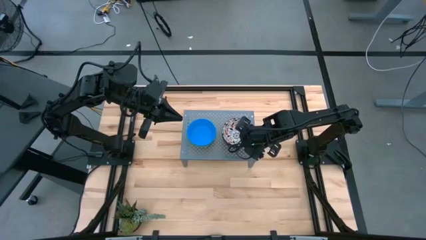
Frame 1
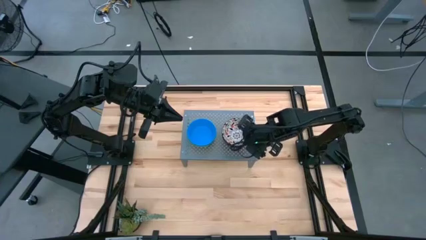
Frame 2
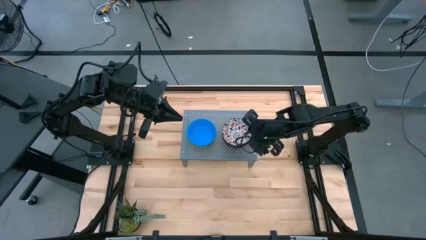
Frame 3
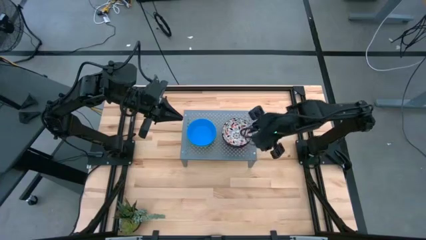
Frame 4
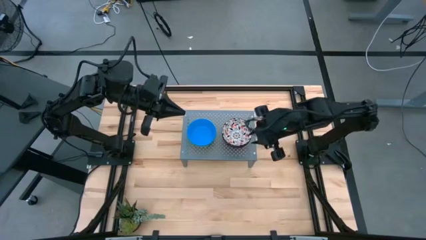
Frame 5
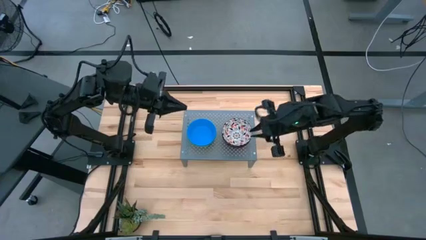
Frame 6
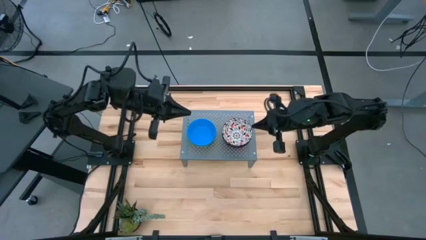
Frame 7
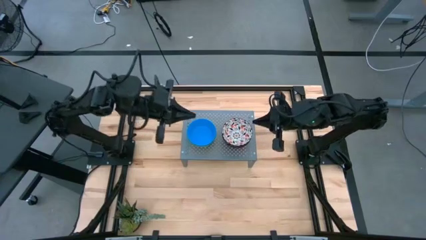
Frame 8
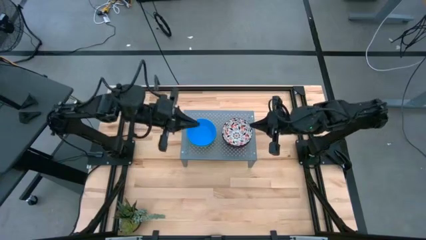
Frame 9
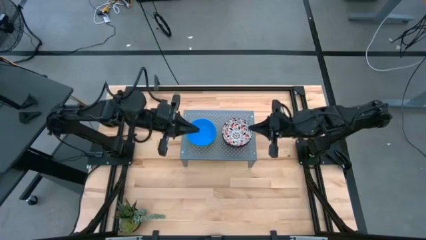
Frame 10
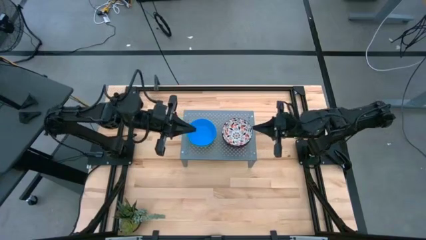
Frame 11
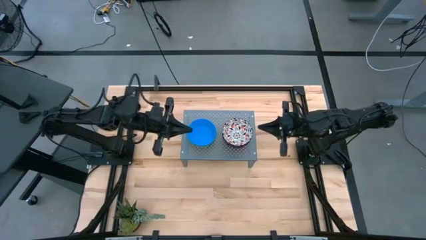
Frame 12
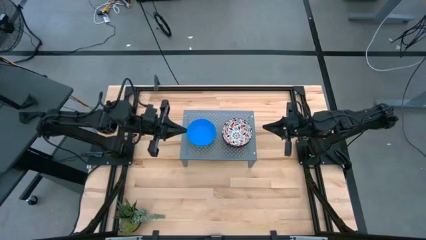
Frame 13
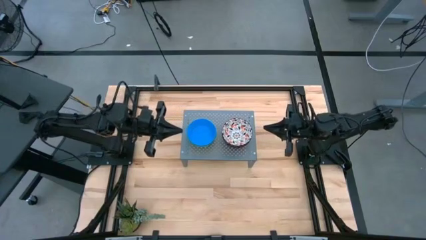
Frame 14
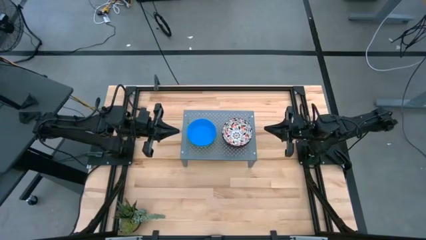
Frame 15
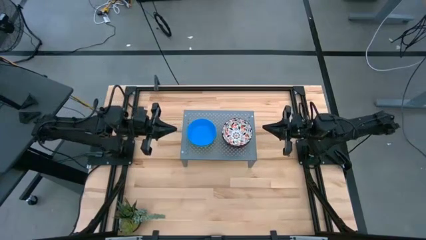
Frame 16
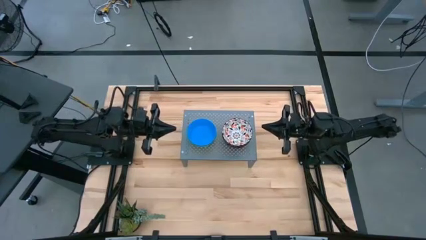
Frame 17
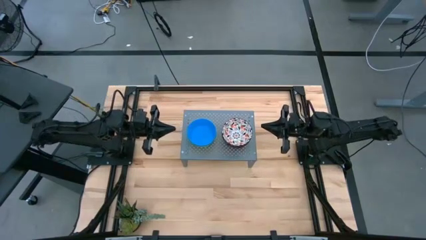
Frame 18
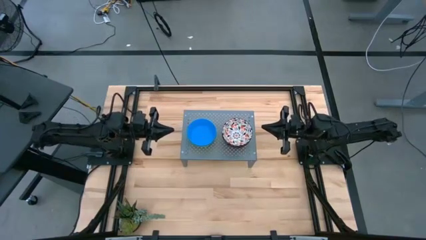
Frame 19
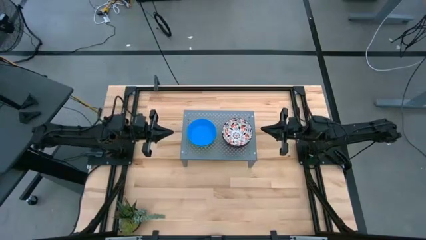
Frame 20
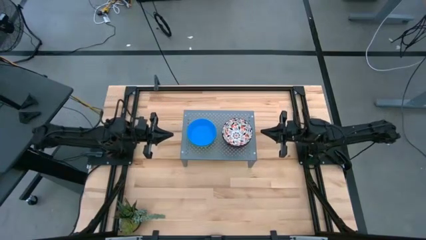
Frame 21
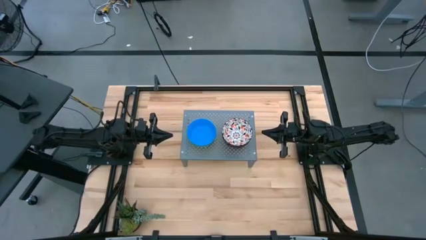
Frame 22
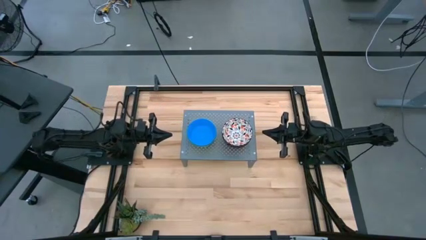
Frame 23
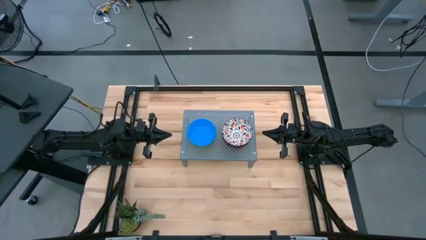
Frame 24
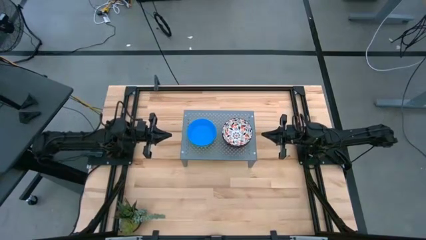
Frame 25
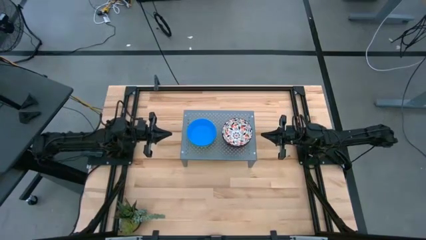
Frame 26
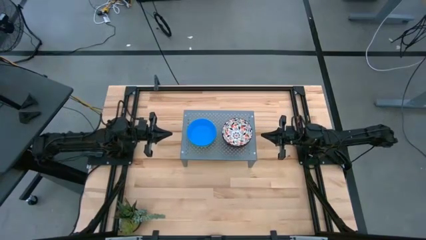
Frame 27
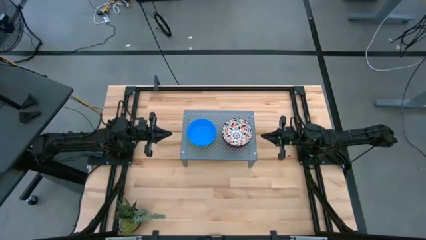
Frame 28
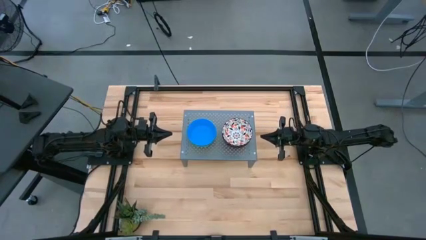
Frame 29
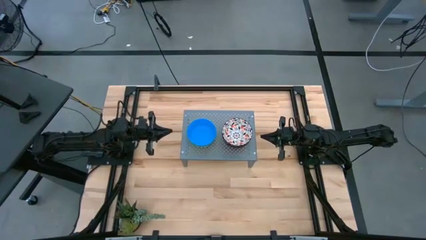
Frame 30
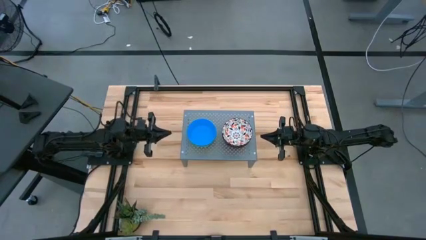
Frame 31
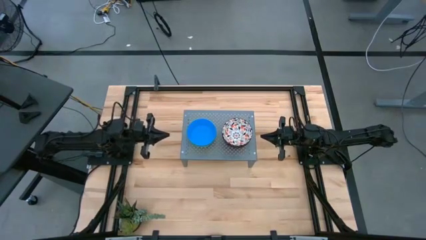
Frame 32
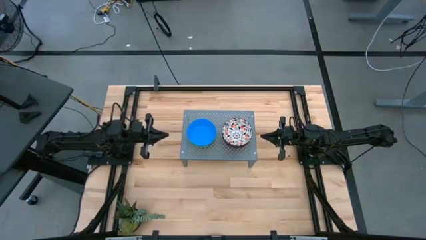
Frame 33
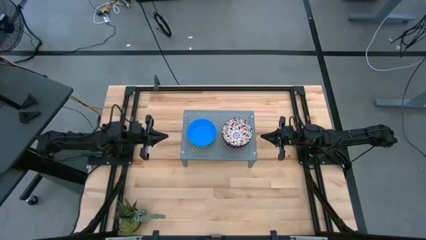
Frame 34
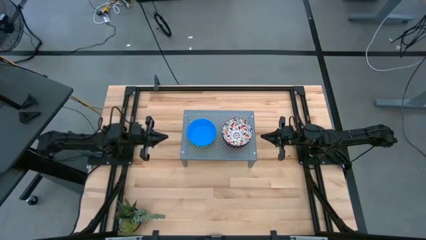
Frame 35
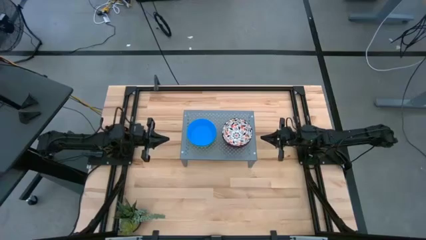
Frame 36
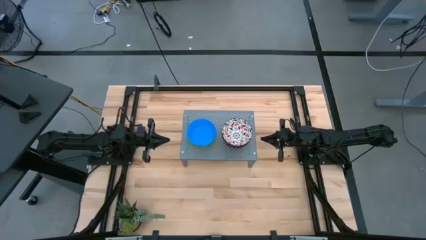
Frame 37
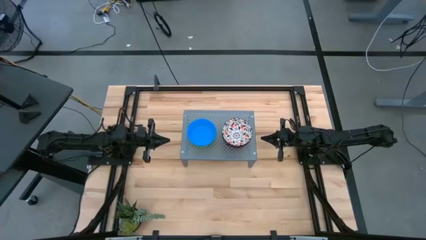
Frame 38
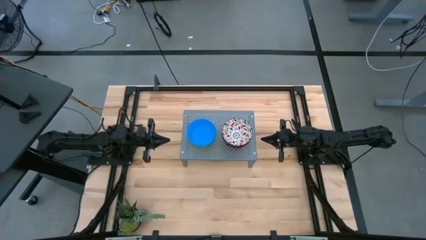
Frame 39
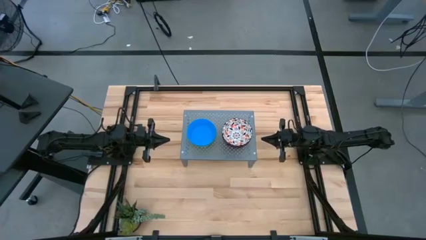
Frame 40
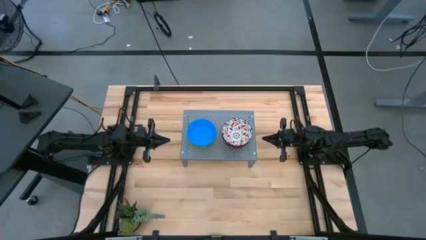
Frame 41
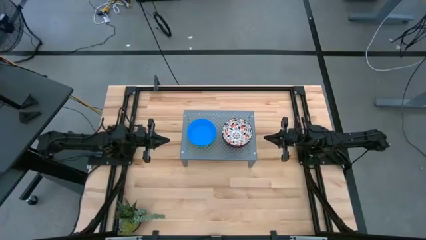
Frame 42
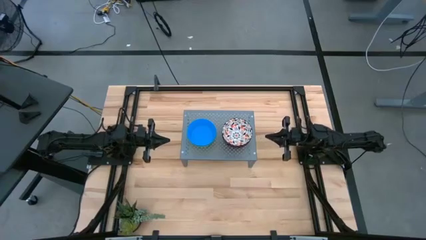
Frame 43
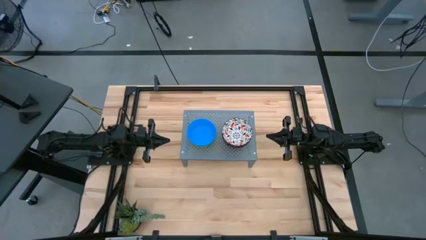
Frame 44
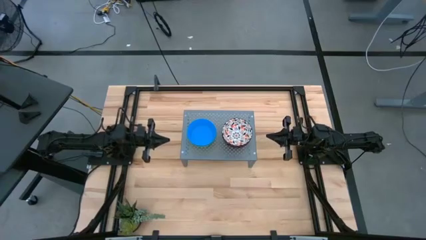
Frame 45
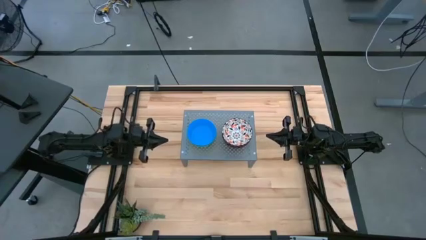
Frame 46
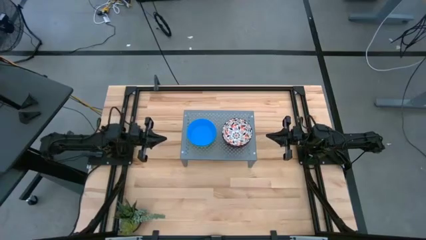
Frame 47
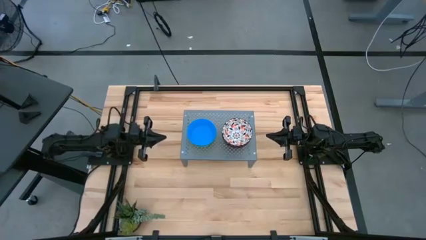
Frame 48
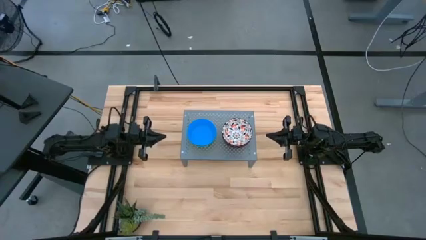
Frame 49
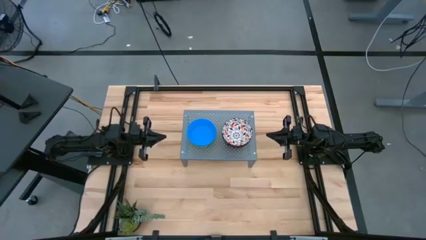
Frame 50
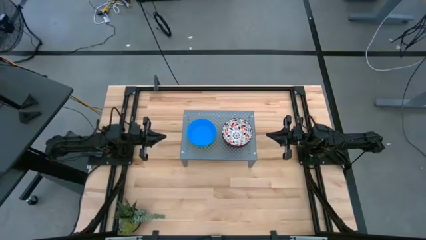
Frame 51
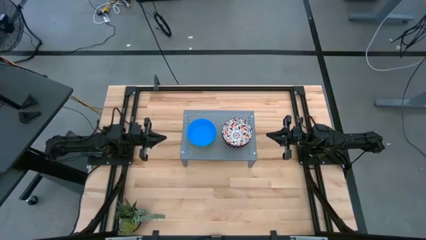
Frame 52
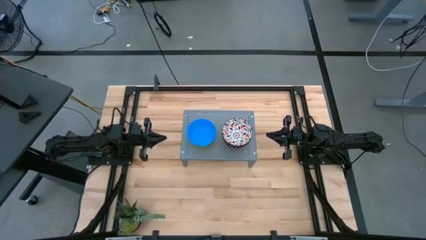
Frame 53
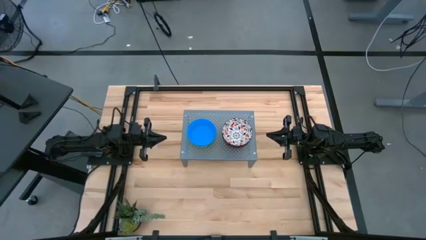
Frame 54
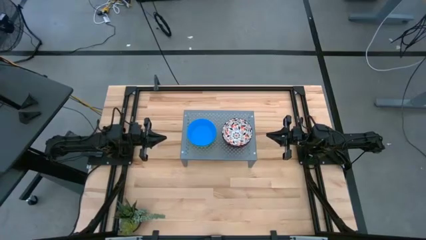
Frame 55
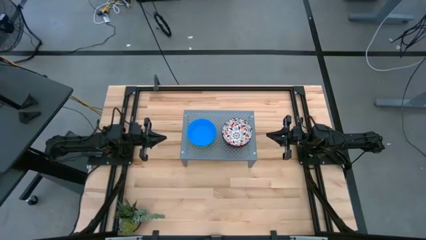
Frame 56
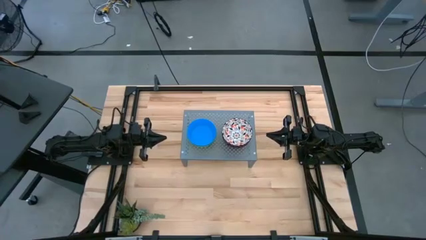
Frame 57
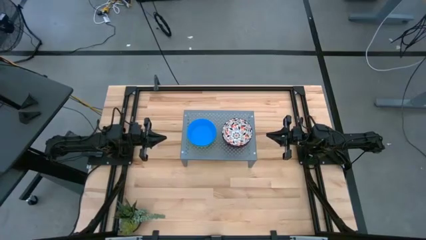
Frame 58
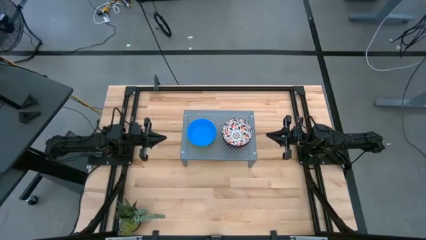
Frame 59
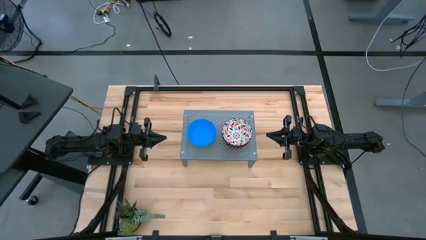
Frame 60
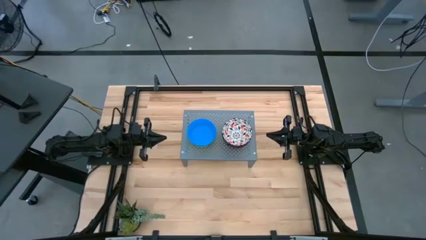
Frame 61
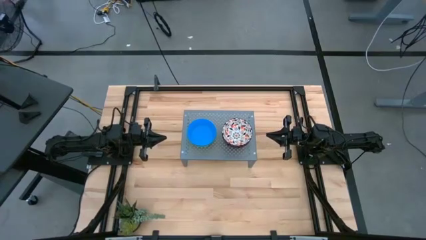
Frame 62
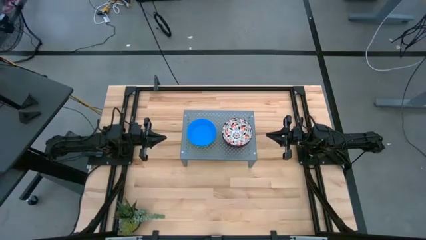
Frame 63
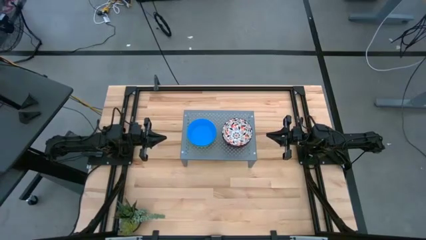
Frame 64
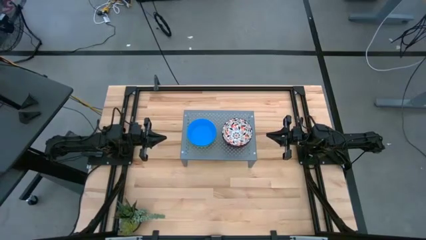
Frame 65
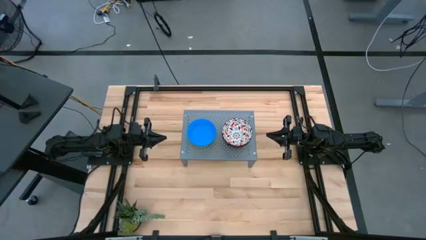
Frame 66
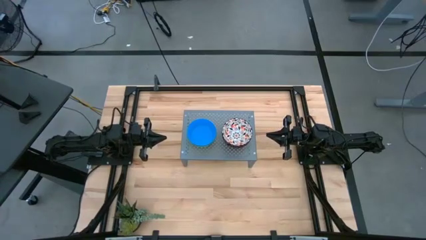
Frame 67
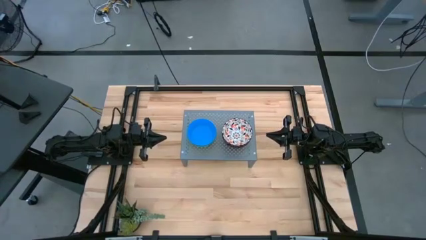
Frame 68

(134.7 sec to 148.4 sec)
Task: Pick & Place Mini bowls
Return to Home Position

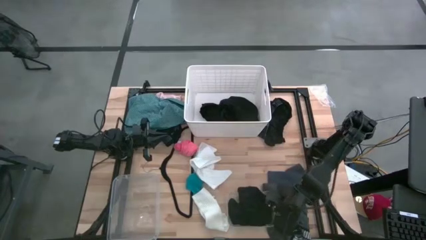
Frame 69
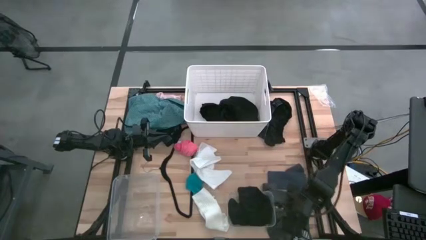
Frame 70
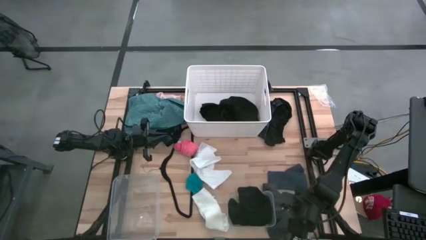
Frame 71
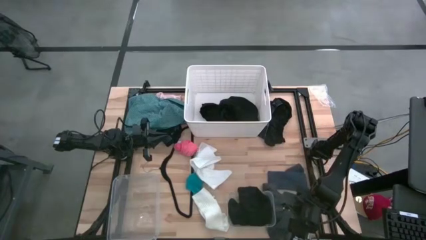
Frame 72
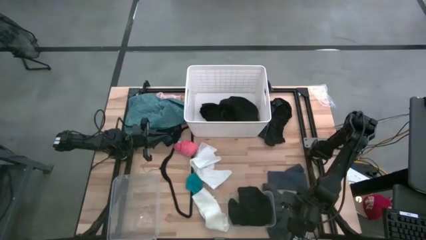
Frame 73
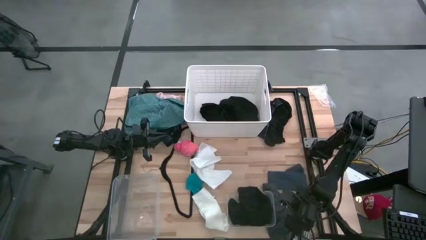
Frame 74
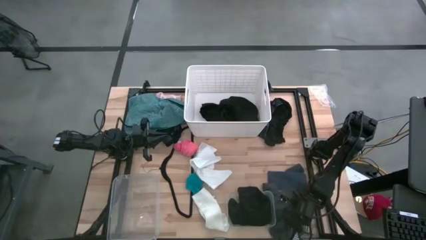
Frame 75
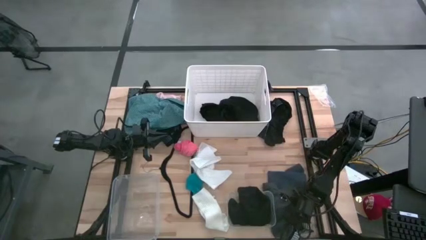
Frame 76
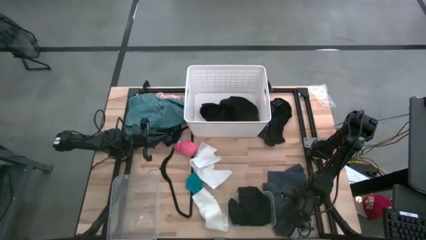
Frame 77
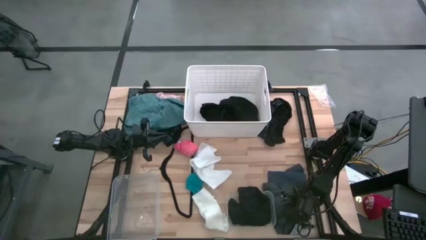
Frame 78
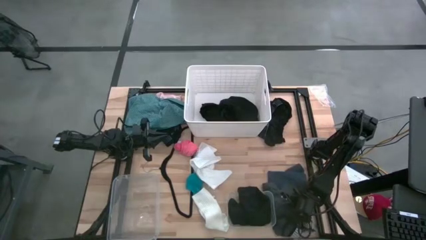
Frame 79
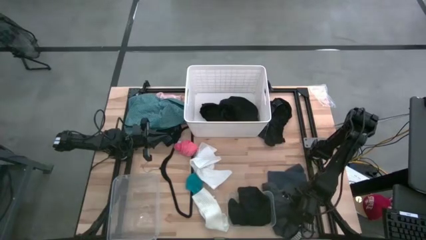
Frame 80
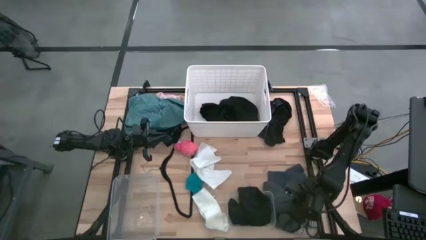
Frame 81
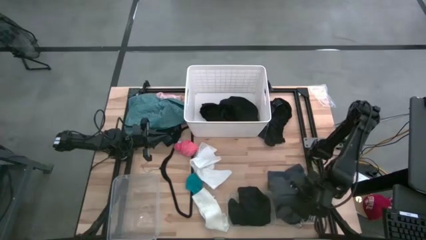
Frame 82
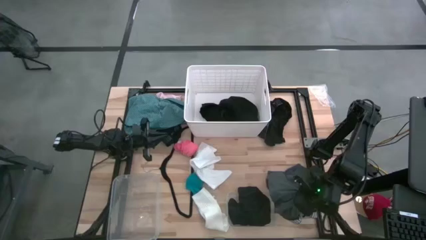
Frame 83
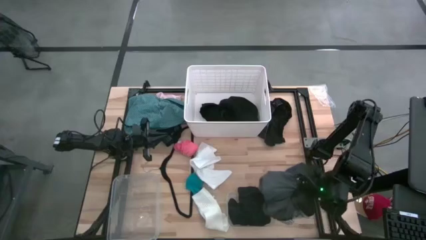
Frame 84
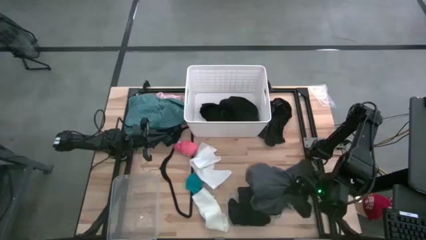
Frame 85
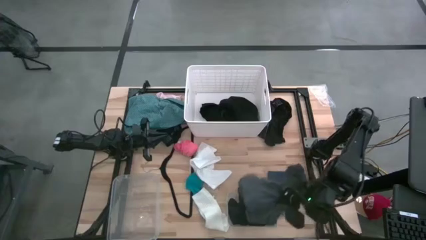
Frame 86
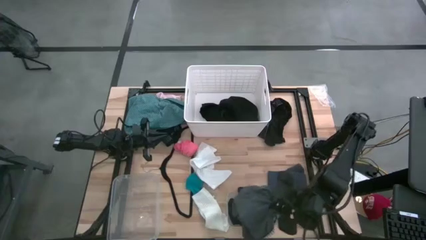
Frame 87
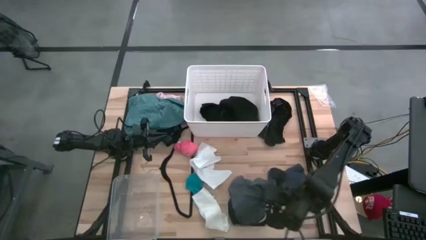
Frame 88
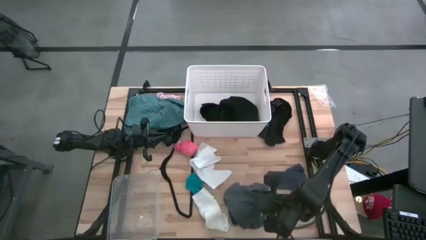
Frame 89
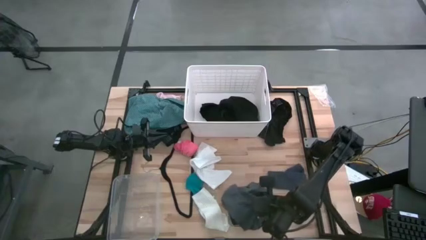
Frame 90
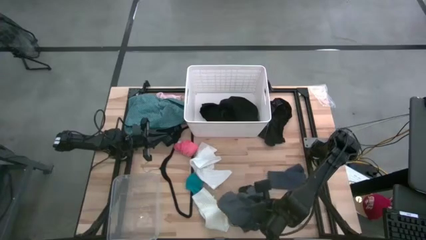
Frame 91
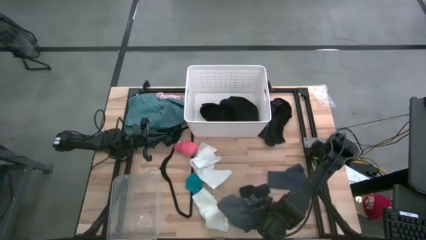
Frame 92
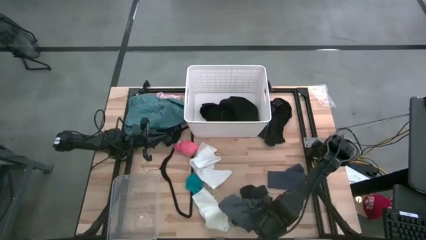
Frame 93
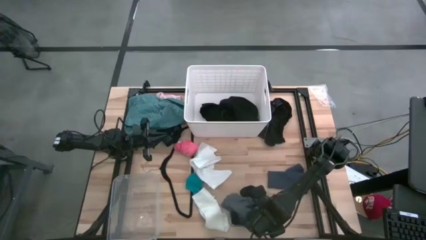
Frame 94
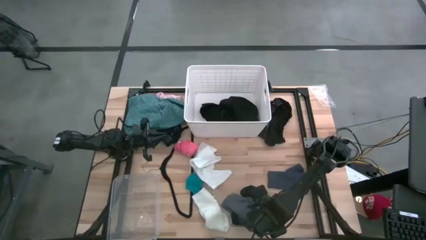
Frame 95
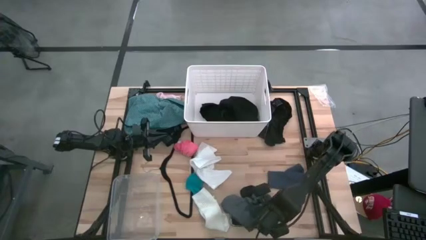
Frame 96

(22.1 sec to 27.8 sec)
Task: Pick & Place Cloths
Put the gray boxer into the right transparent bin
